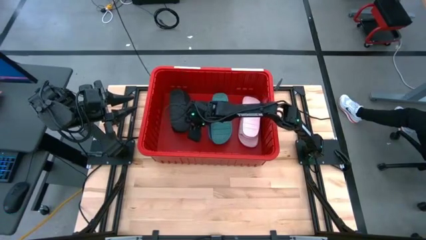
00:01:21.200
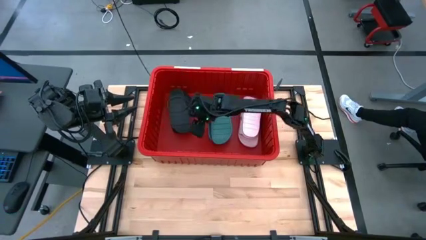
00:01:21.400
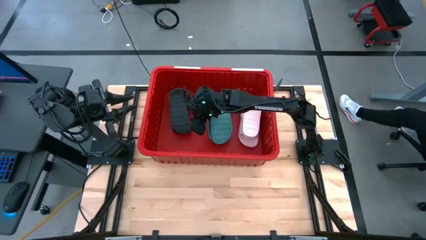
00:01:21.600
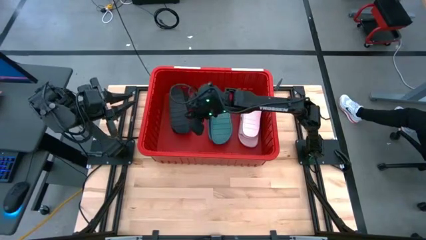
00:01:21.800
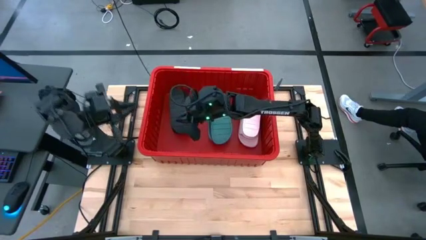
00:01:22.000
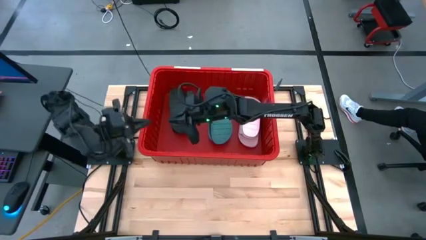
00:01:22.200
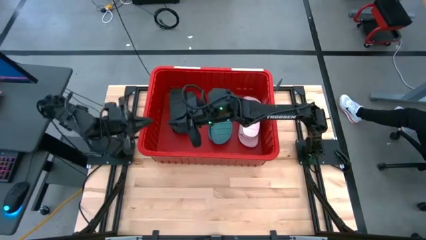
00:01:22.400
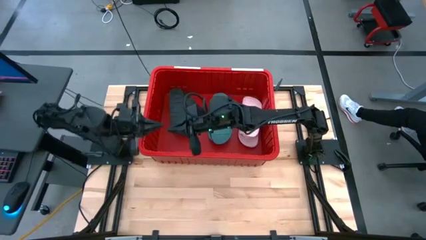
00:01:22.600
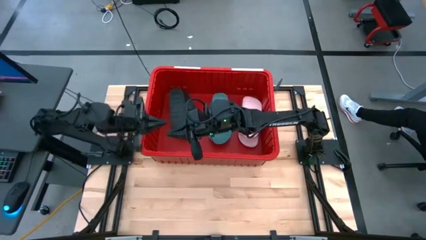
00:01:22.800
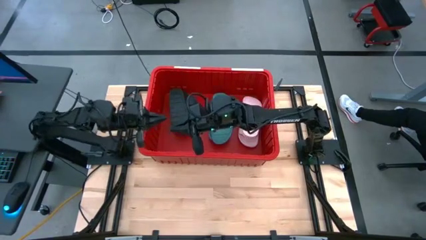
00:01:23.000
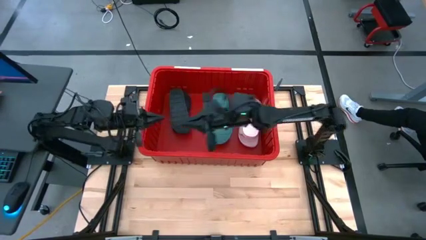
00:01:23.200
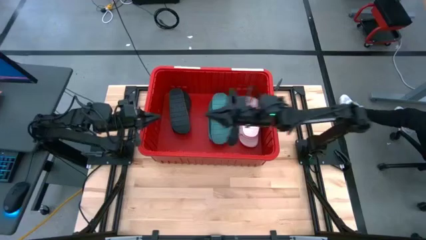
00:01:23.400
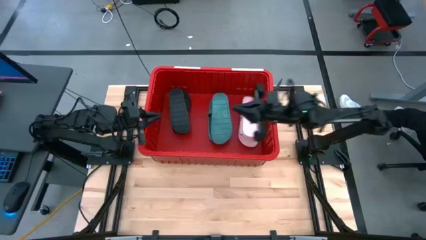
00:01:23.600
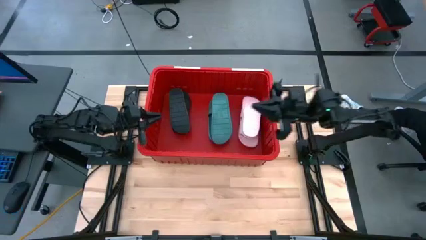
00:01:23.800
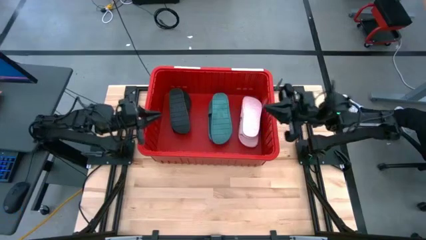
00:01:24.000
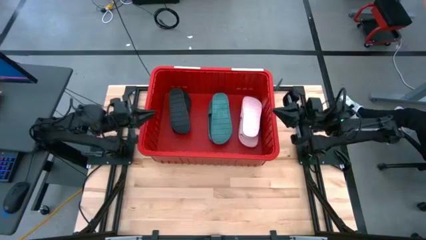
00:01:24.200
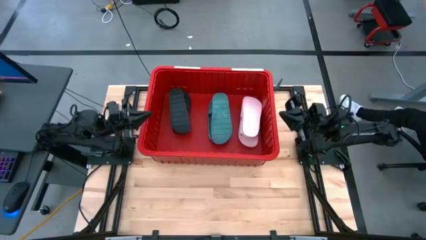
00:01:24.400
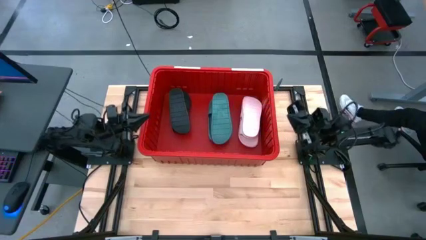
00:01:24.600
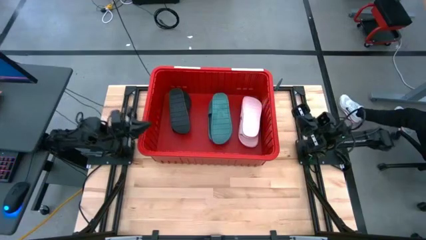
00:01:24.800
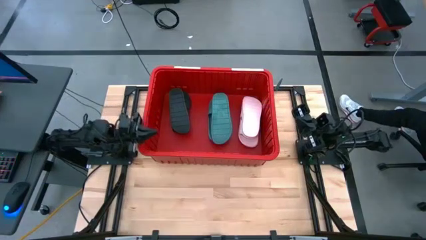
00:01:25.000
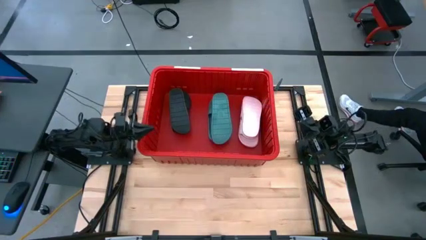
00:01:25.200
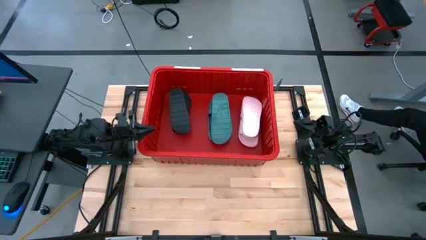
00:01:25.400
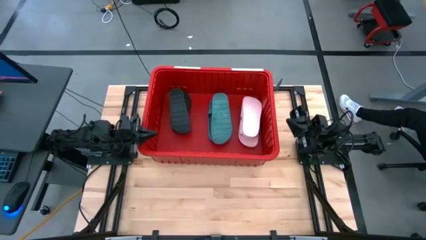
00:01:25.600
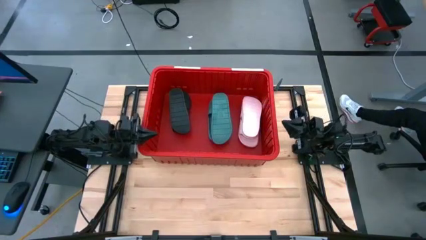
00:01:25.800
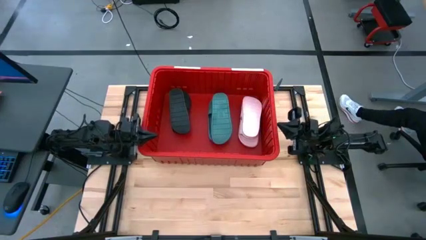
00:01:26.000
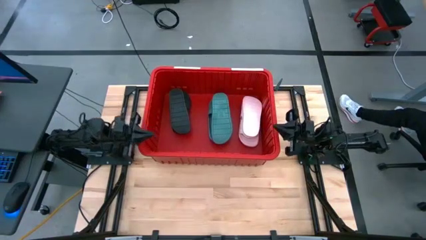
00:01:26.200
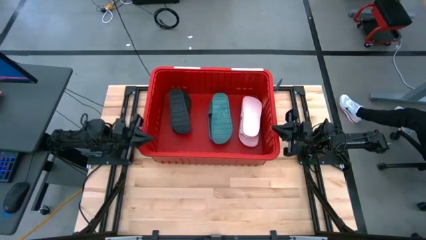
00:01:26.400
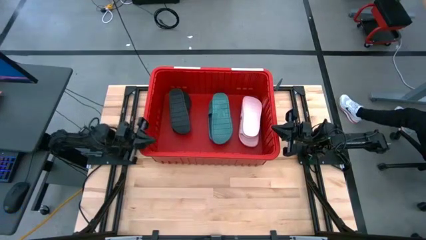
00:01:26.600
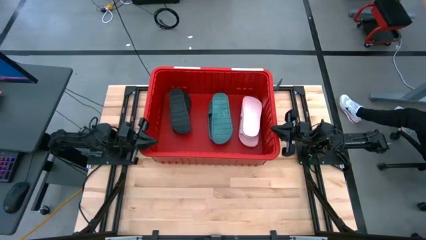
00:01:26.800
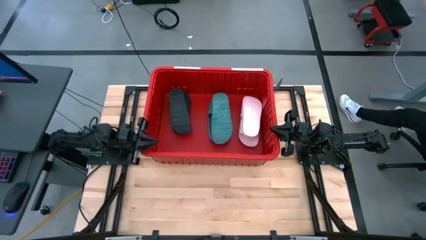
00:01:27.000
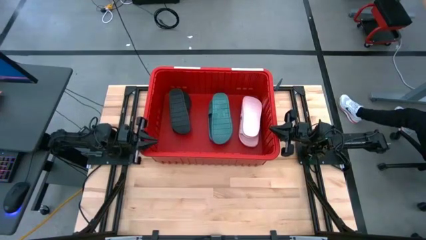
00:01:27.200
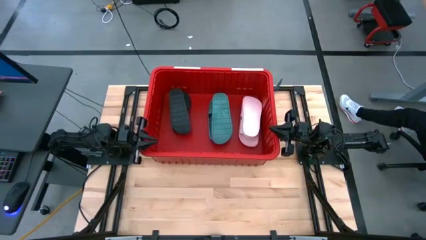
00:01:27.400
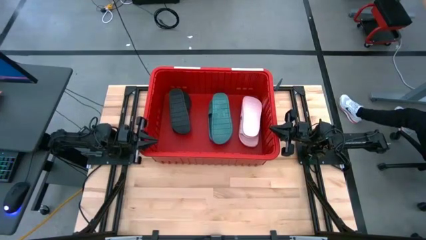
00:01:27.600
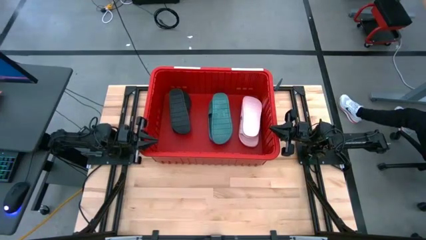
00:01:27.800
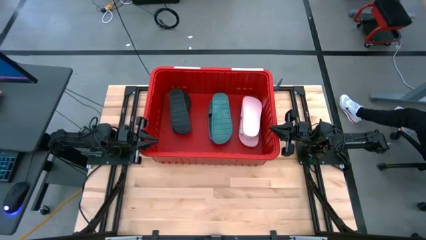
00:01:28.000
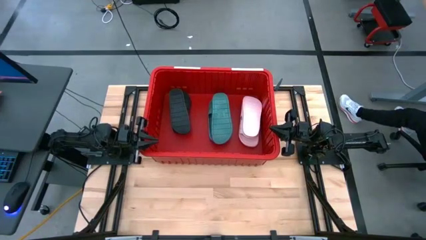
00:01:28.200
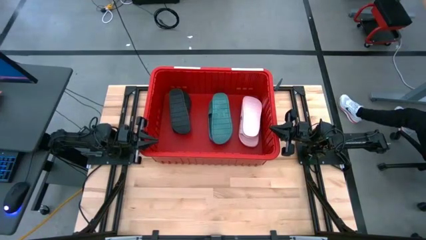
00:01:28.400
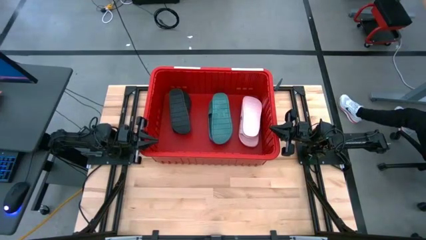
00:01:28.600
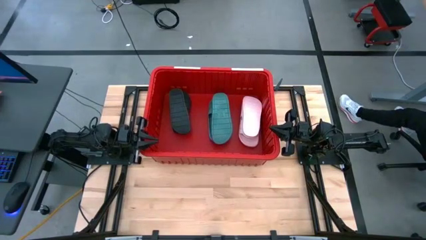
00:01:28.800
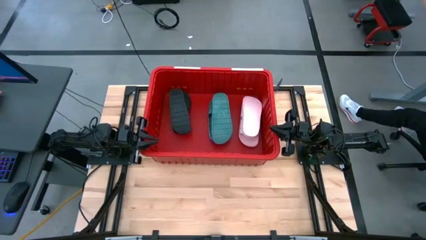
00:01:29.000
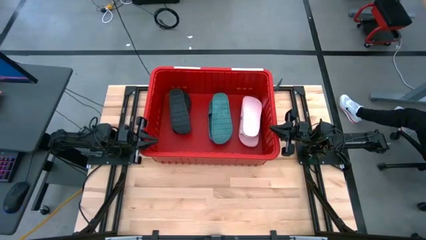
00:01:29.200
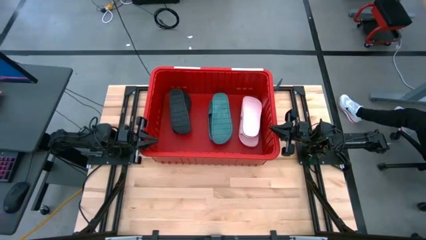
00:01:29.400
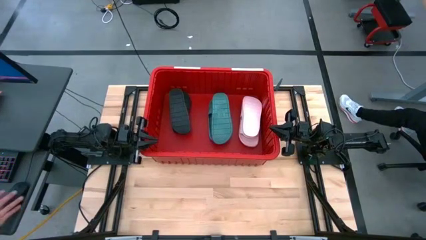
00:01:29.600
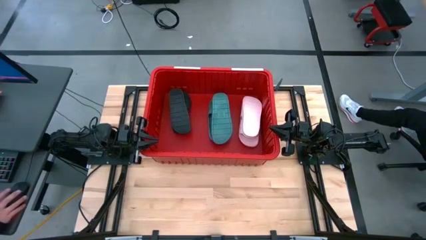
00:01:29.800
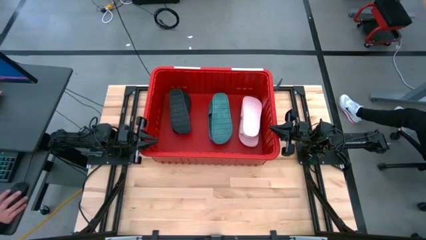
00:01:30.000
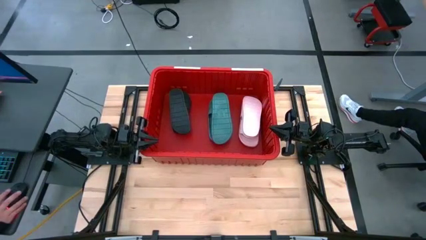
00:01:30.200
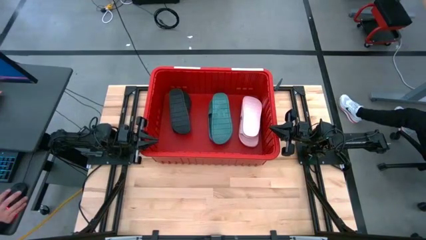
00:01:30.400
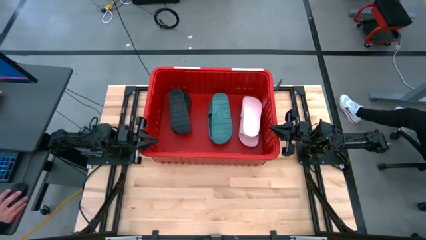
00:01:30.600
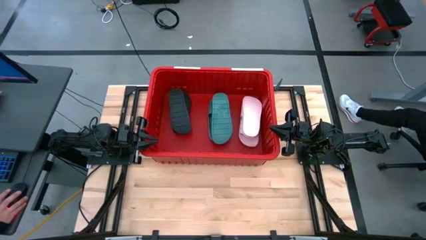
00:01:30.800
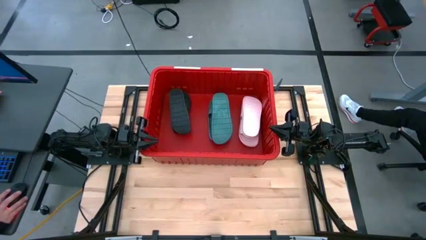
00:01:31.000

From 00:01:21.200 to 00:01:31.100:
Task: Pick and place slides into bin
Return to Home Position

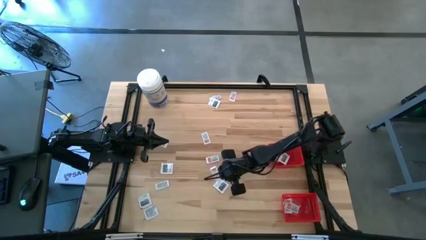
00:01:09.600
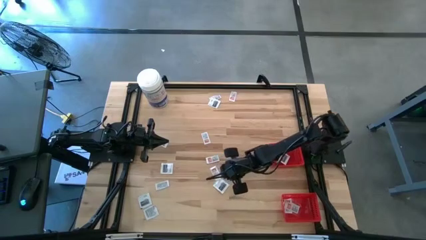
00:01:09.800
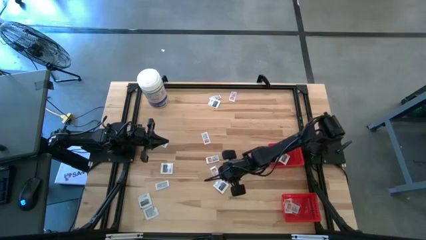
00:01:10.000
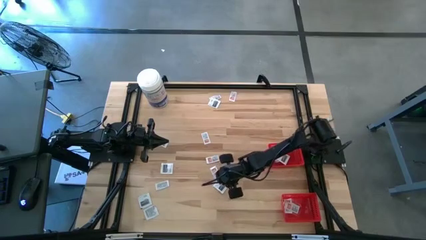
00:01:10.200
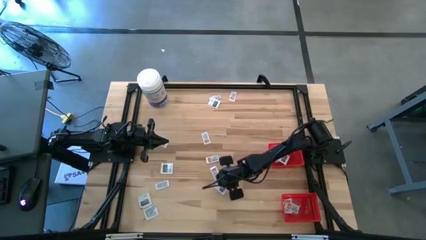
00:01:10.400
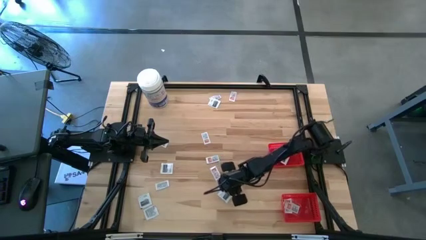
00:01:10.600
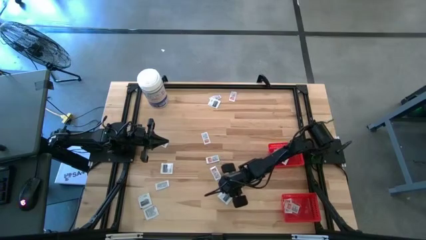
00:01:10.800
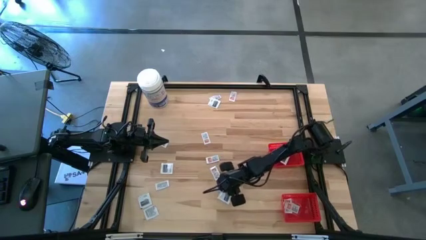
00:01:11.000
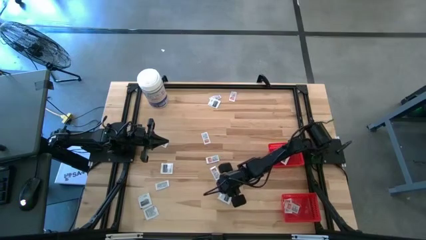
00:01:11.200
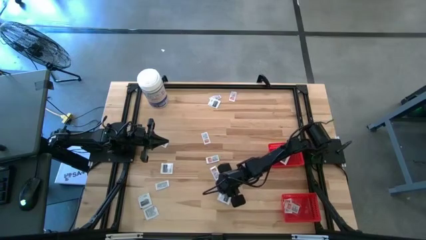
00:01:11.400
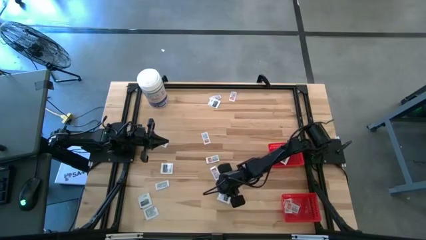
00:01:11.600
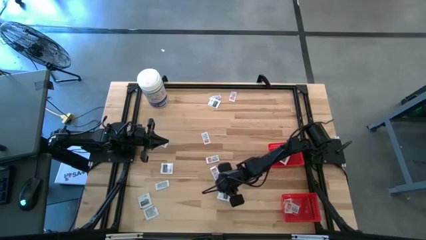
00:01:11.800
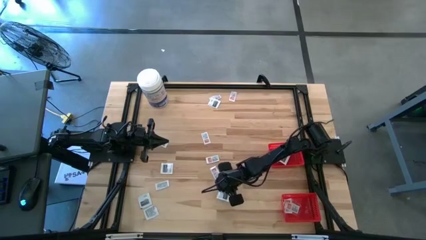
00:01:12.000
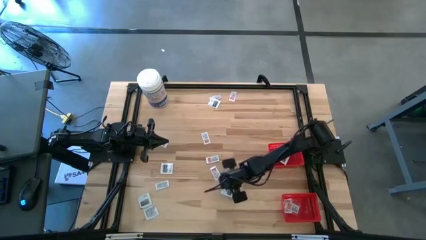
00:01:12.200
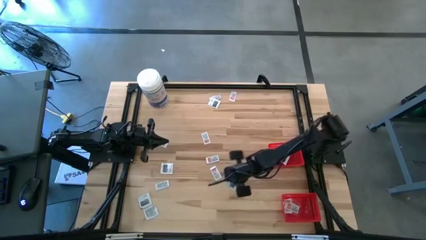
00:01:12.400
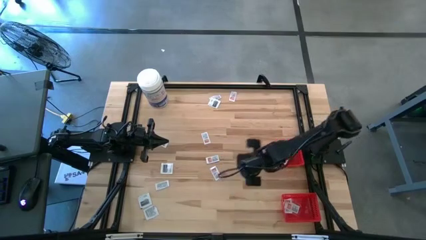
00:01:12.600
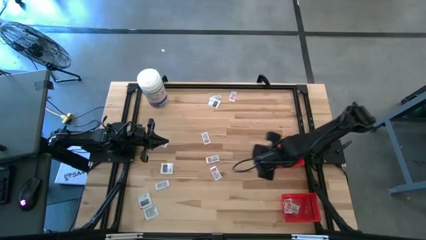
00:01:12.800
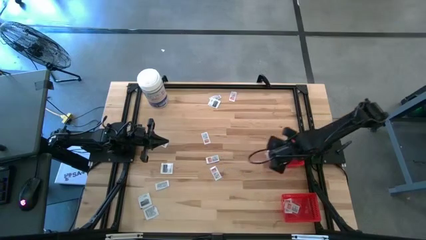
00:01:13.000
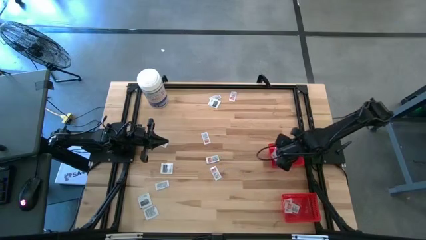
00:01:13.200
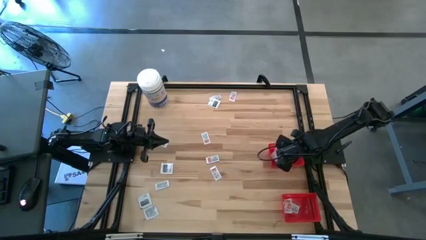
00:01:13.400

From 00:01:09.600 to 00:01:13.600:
Task: Pick & Place First Aid Supplies
Put the black towelette pack into the top red basket

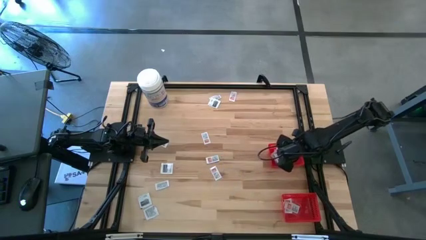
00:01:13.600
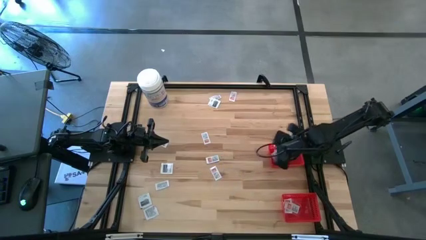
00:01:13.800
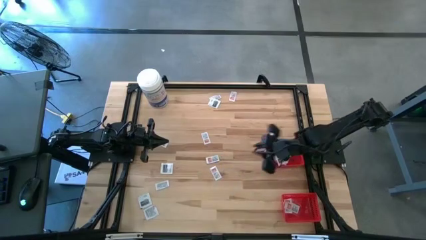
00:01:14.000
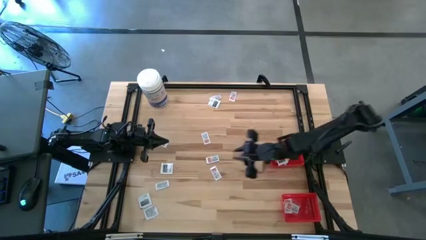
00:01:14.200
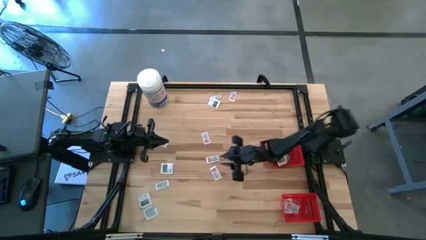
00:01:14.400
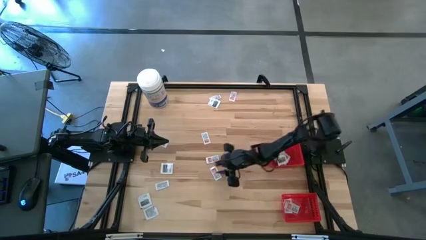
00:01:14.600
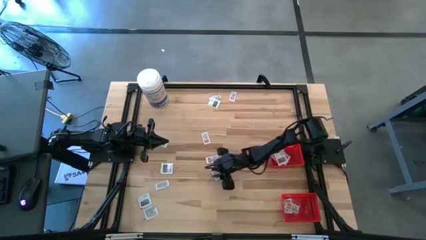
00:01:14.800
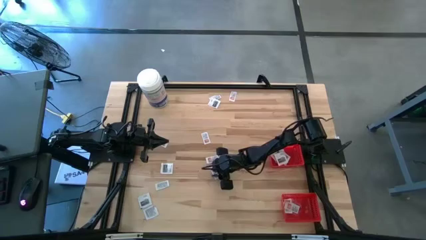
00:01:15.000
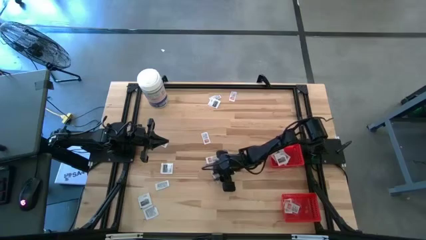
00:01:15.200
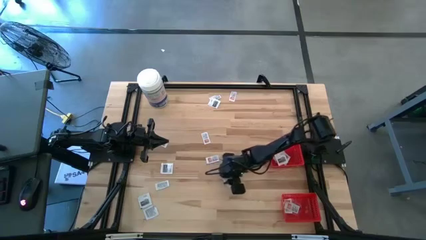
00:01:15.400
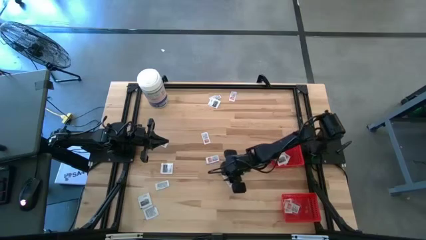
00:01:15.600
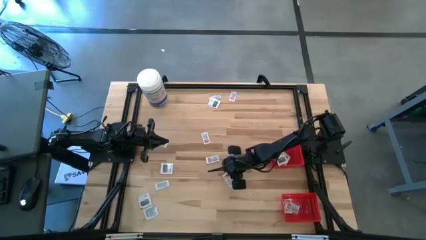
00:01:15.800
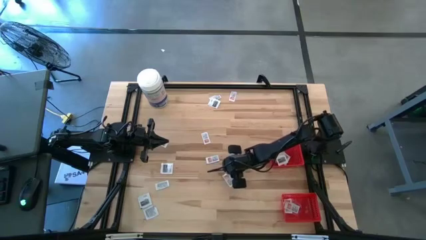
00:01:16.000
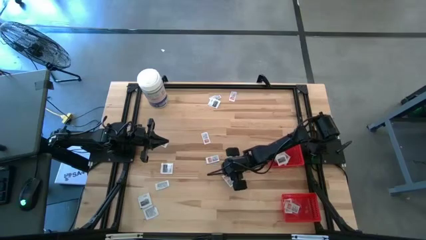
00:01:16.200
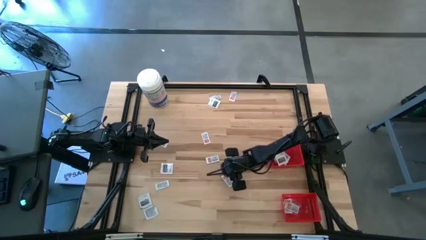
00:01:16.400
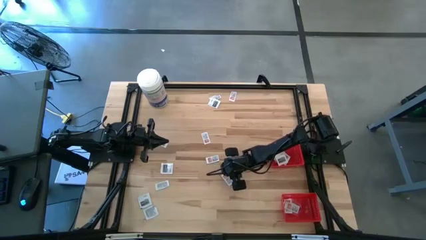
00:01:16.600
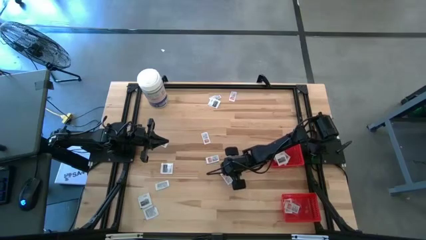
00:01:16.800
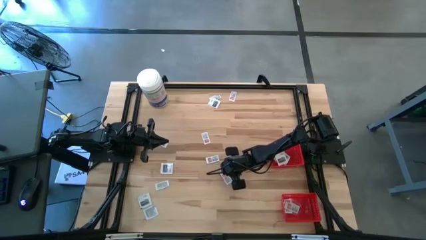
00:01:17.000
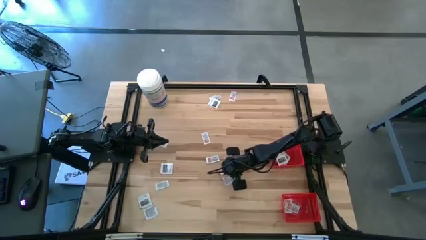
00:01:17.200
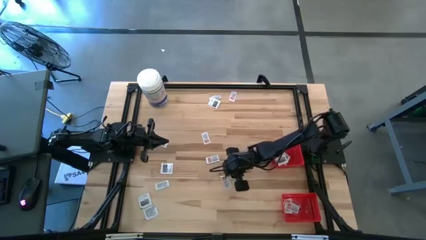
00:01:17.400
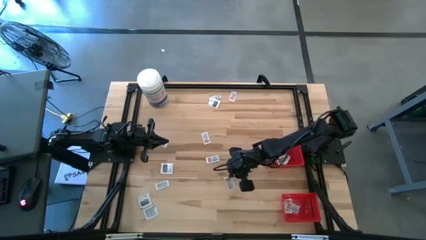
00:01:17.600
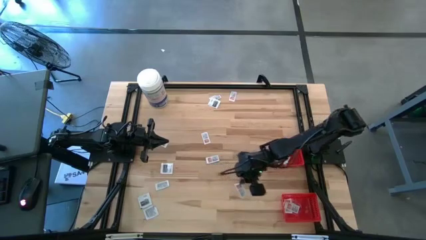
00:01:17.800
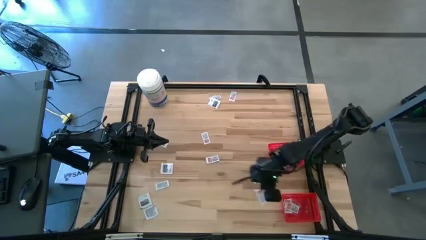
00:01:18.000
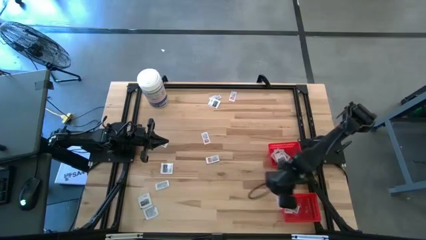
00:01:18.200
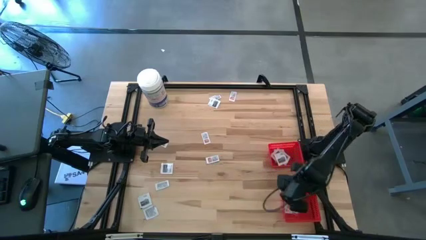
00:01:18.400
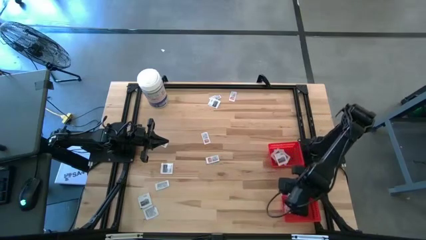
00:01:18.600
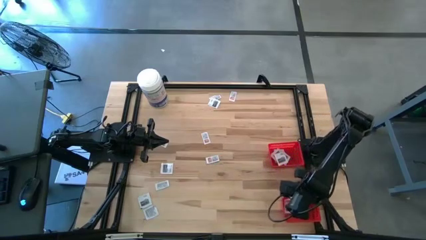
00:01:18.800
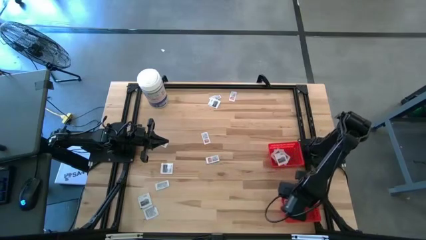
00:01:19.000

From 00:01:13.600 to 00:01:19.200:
Put the orange ointment pack into the bottom red basket
